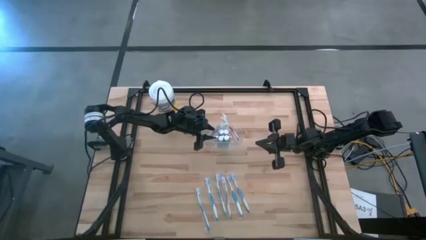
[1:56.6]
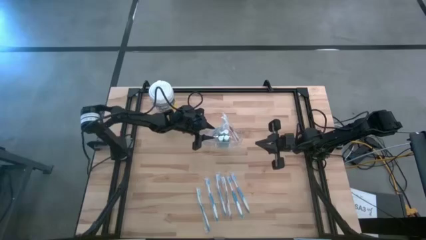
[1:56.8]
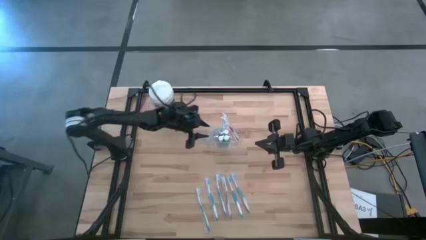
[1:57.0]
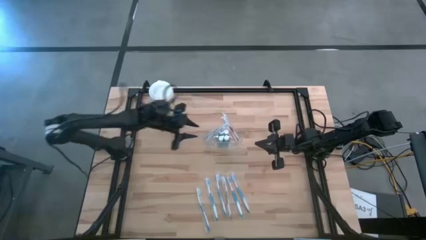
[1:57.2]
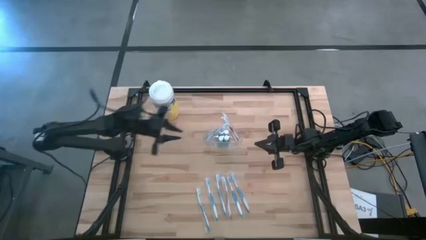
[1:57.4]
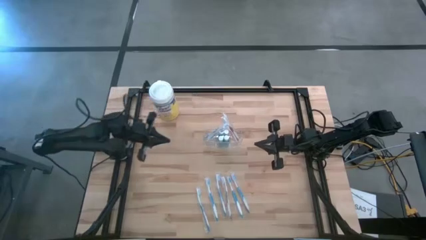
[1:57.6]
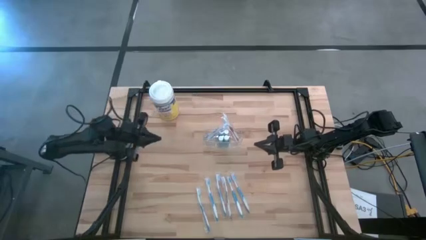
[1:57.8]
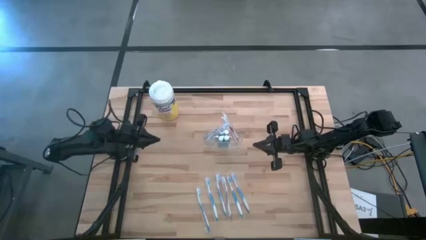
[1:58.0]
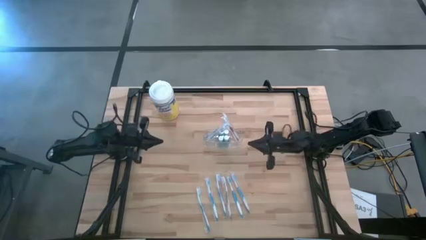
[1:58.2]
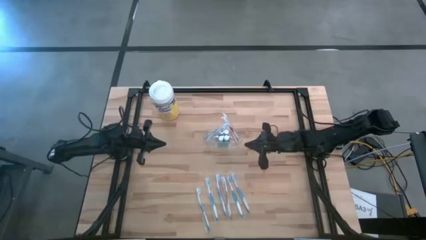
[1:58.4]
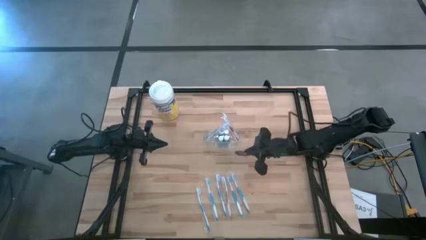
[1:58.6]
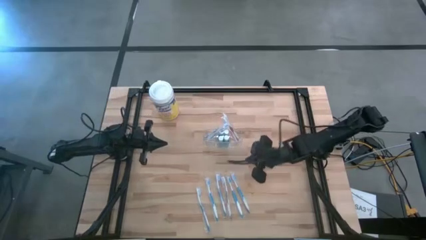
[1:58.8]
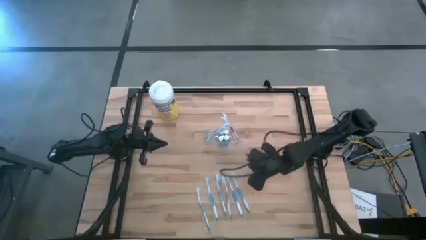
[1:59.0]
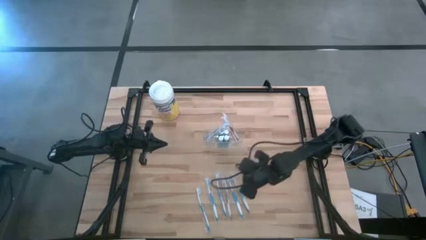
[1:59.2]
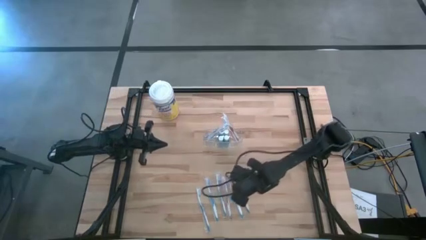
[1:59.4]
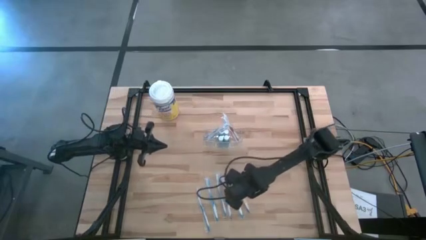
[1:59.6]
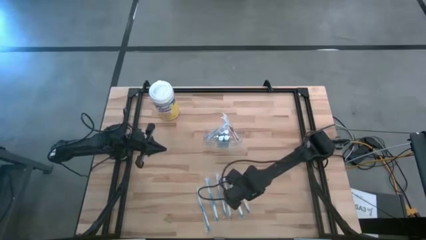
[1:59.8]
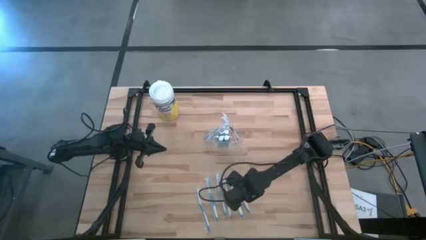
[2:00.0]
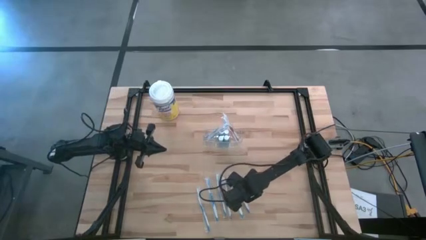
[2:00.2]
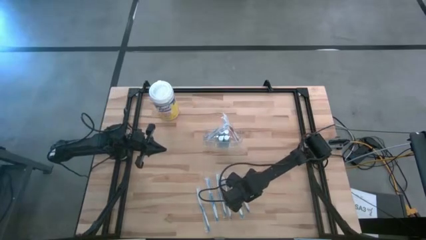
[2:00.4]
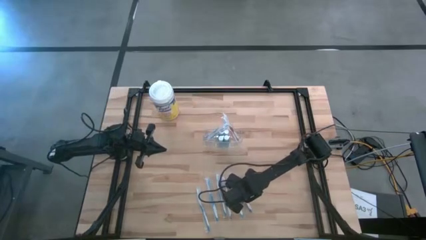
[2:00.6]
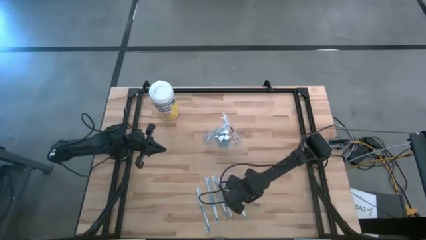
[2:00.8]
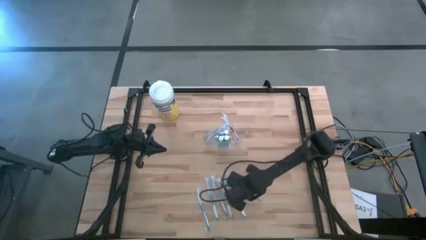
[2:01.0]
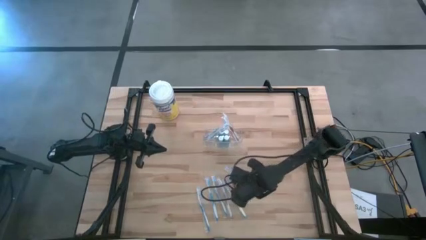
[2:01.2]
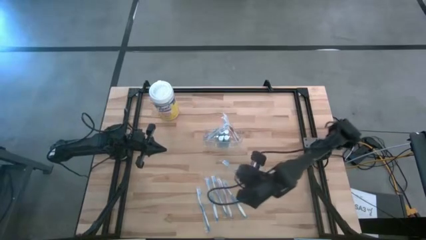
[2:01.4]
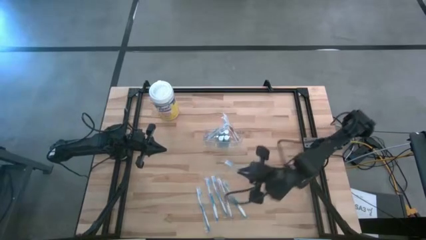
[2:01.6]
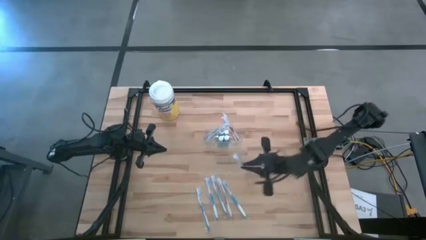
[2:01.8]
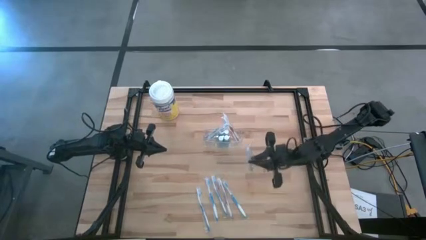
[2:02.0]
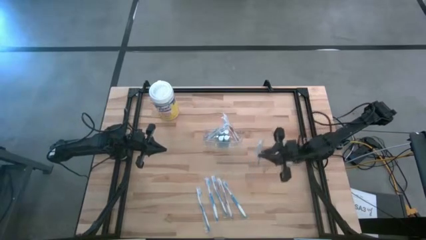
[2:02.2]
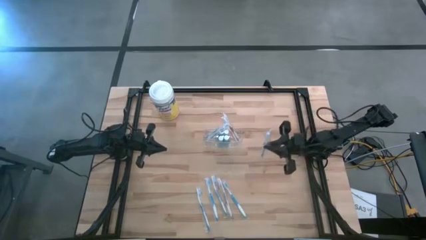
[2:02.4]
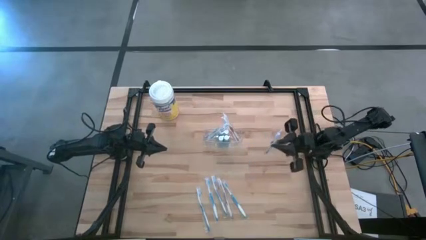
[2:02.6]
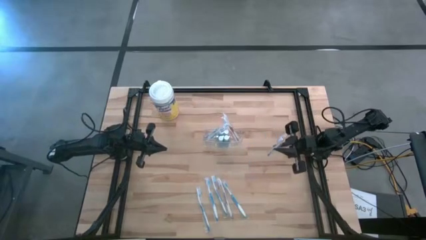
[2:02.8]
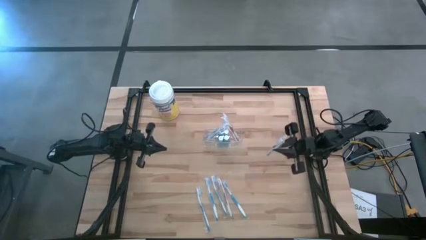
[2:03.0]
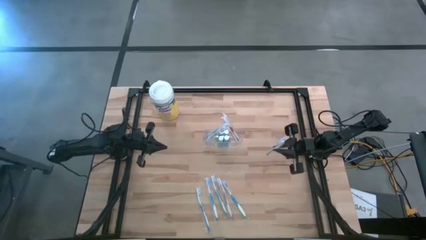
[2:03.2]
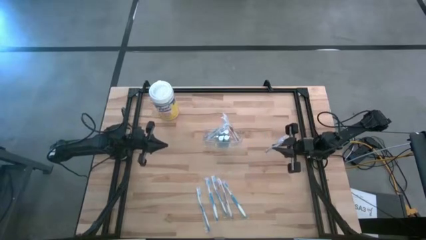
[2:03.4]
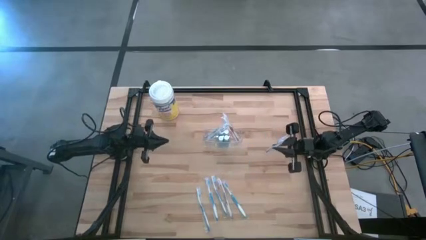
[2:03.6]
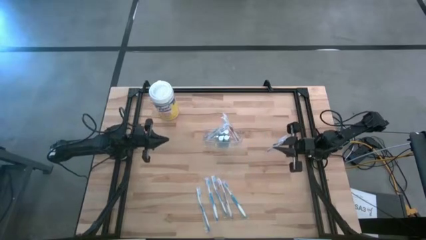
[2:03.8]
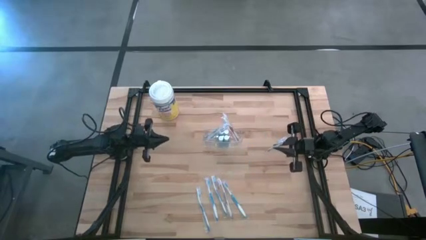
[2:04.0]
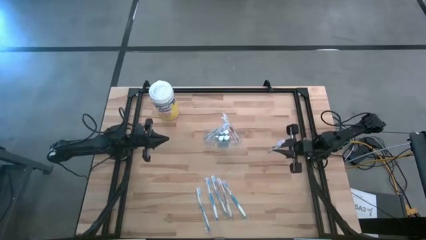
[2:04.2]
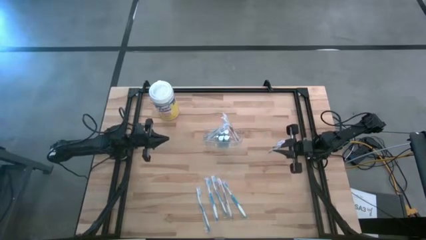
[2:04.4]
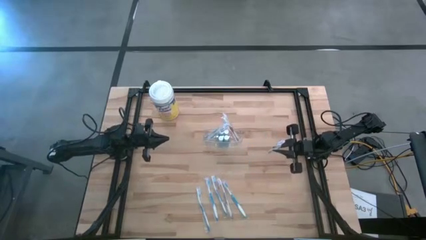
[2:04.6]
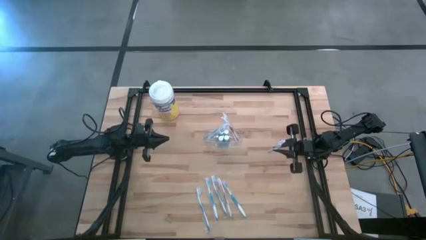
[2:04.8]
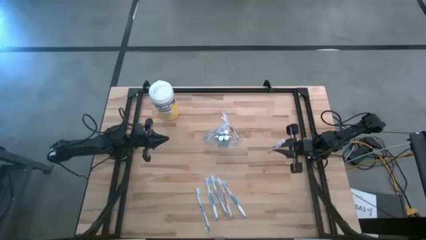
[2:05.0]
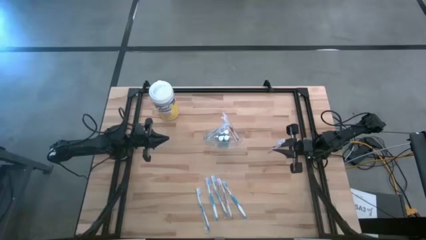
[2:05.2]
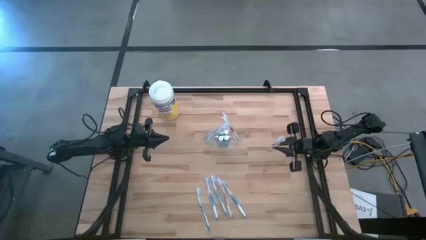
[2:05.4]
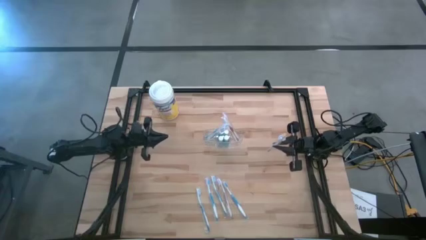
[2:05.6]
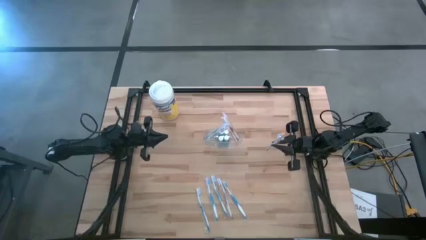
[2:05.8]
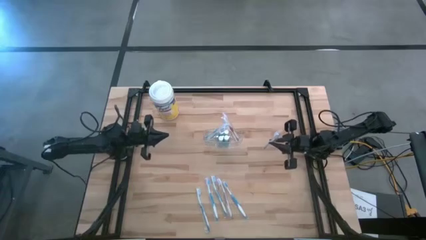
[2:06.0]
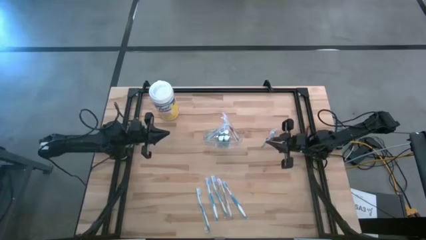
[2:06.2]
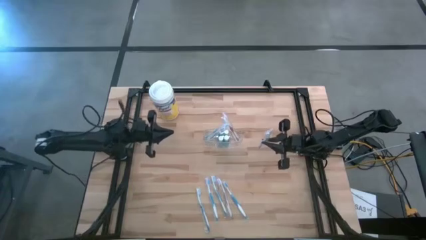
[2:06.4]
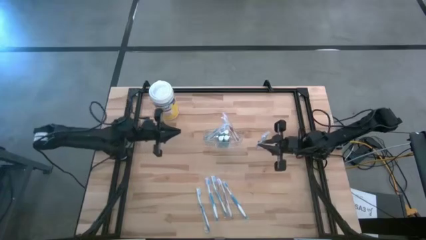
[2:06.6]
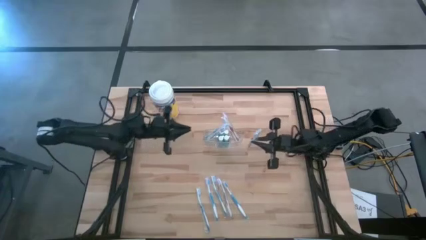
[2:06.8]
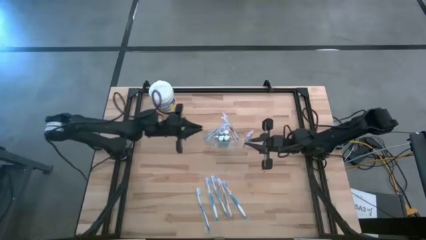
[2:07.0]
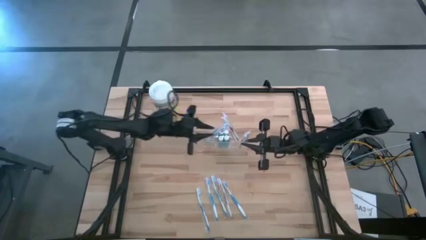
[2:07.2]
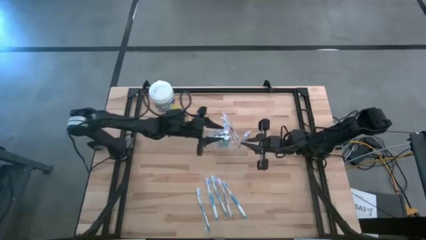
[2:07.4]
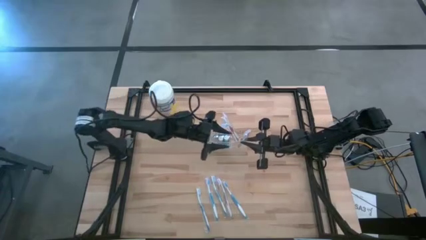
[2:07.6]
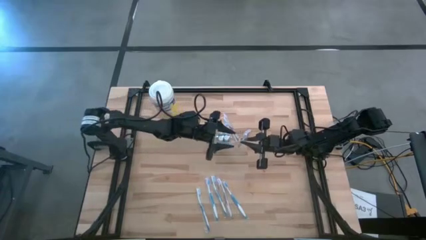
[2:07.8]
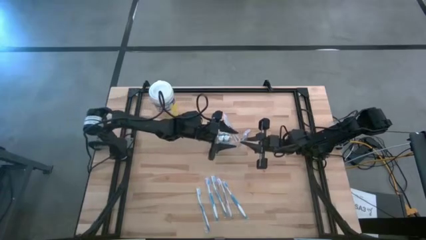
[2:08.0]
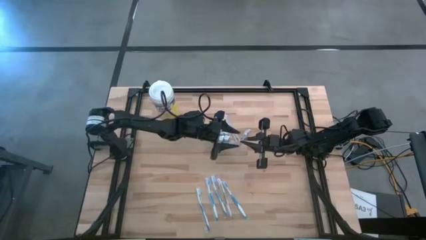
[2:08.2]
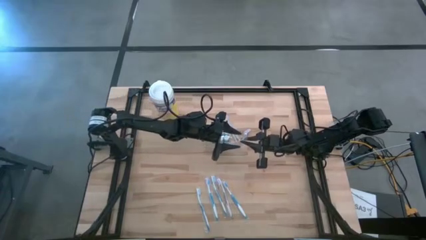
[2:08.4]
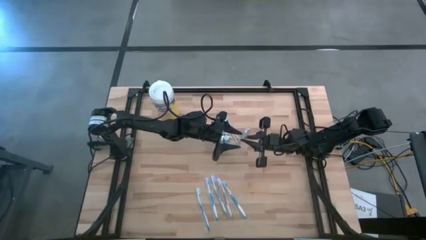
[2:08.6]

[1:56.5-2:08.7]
Task: Pick & Place toothbrushing station
Put the blue toothbrush into the left section of the transparent organizer
